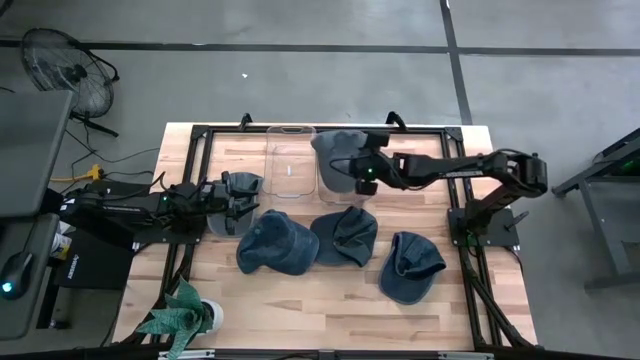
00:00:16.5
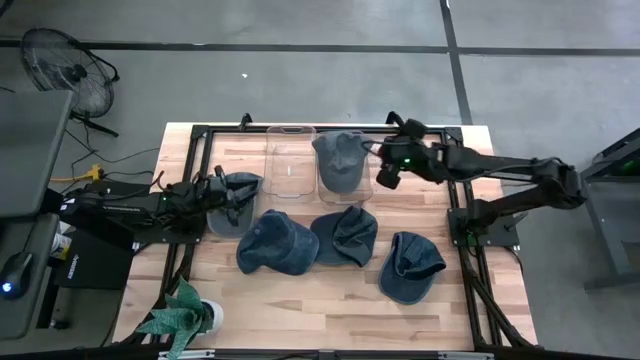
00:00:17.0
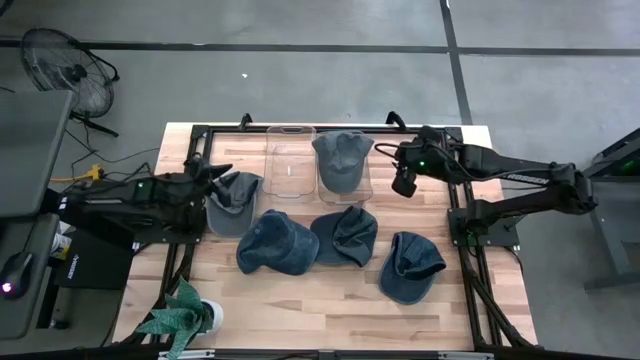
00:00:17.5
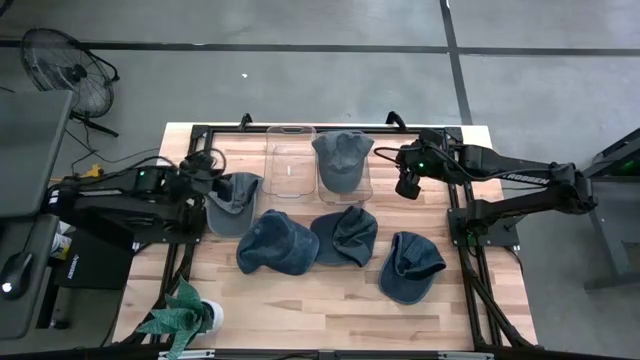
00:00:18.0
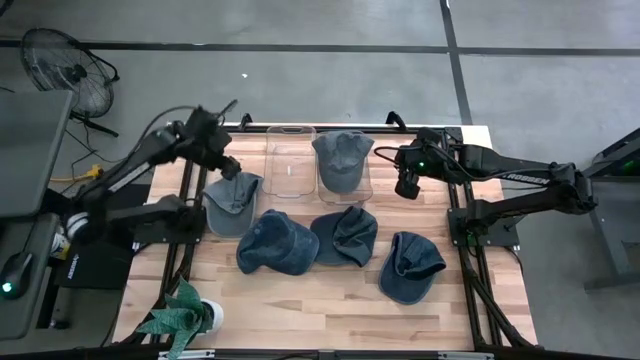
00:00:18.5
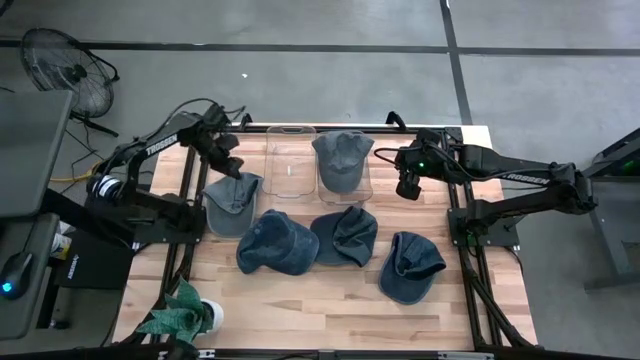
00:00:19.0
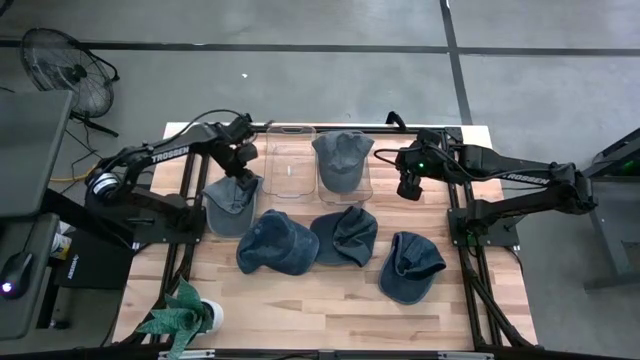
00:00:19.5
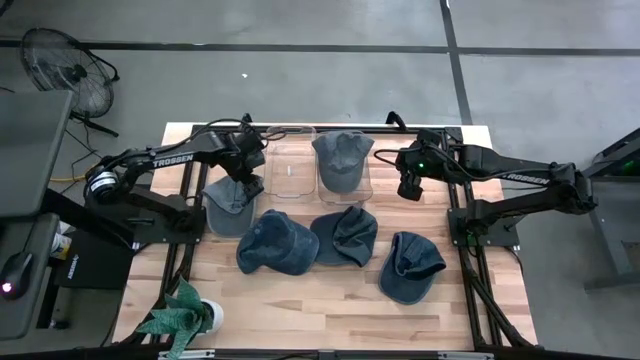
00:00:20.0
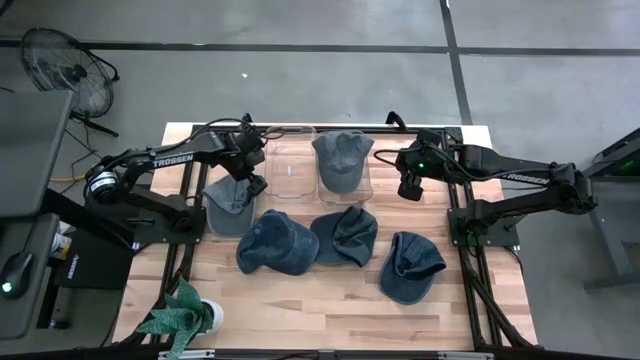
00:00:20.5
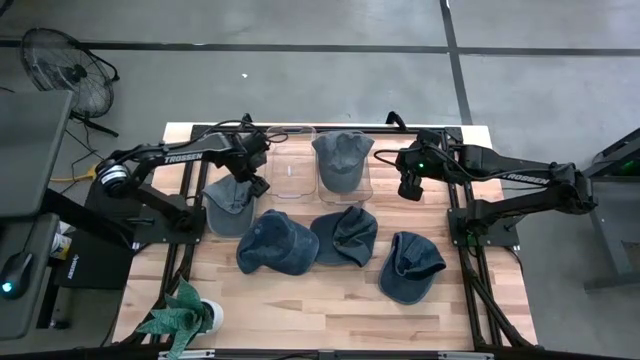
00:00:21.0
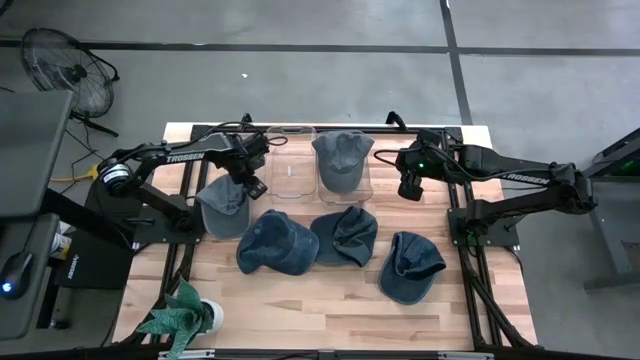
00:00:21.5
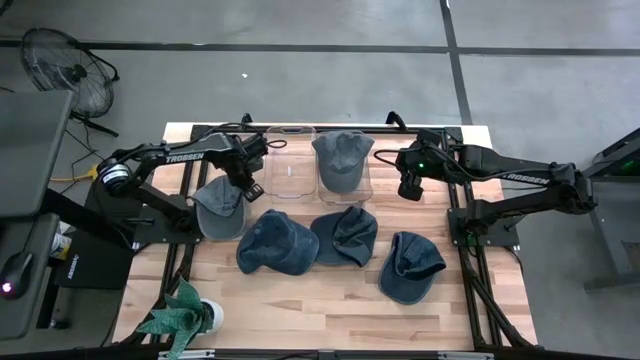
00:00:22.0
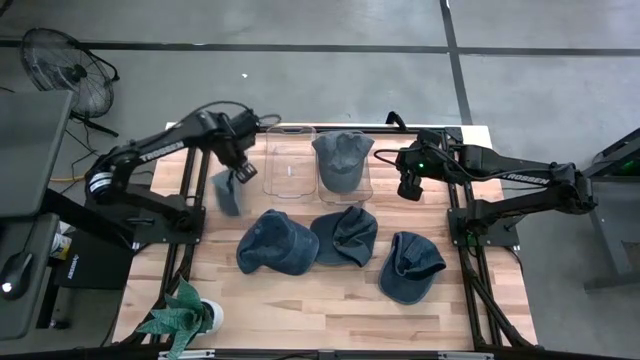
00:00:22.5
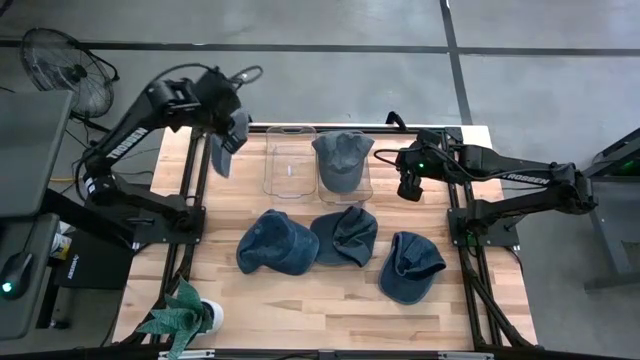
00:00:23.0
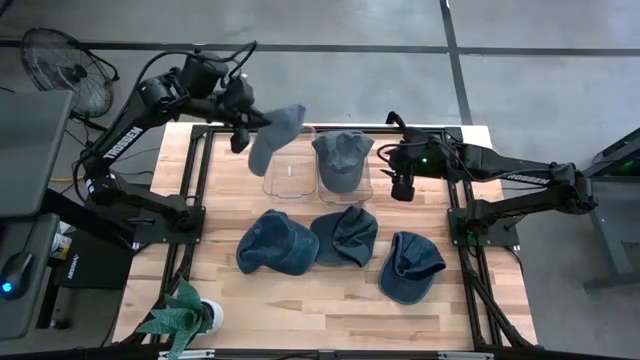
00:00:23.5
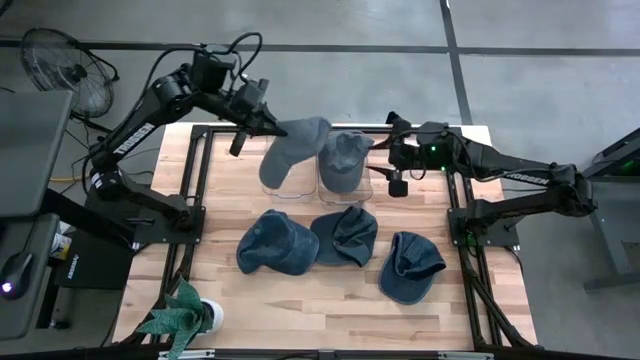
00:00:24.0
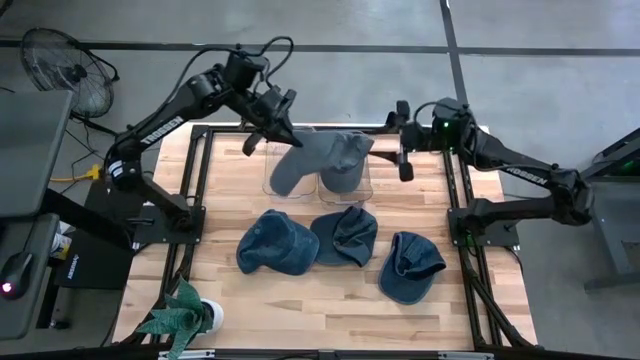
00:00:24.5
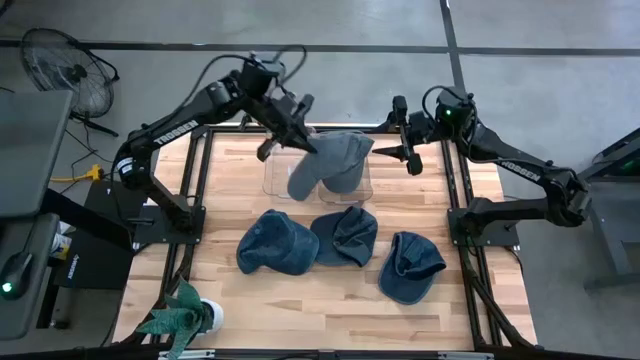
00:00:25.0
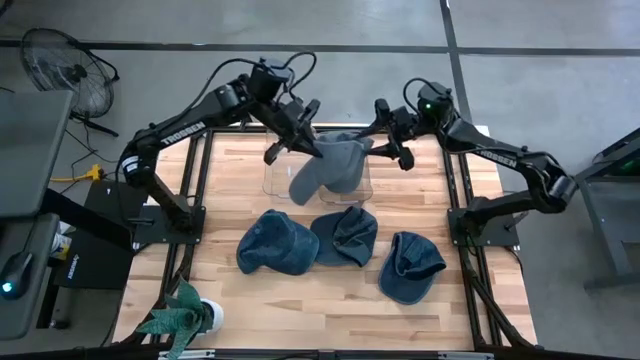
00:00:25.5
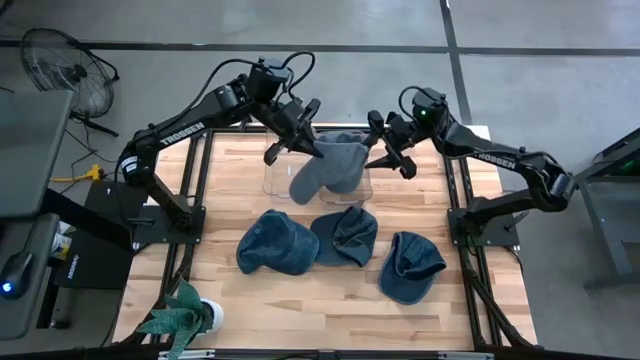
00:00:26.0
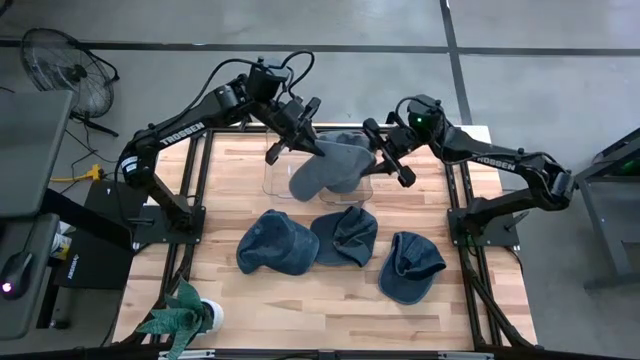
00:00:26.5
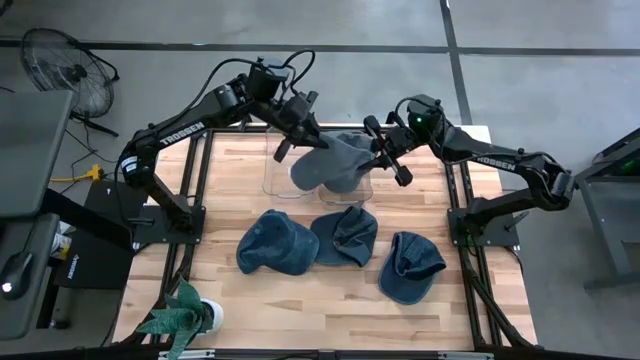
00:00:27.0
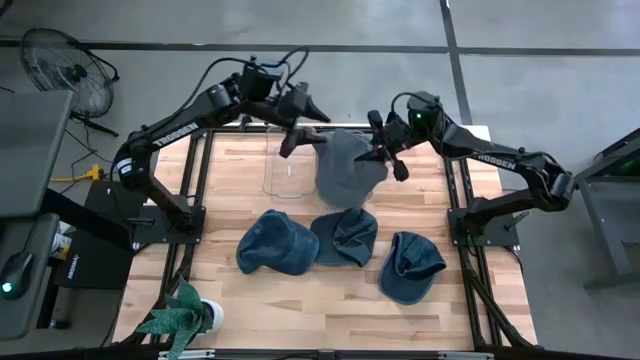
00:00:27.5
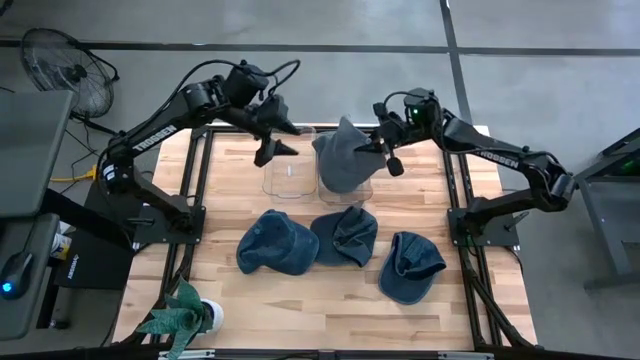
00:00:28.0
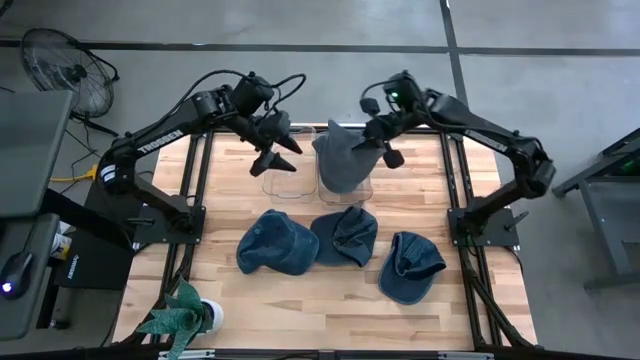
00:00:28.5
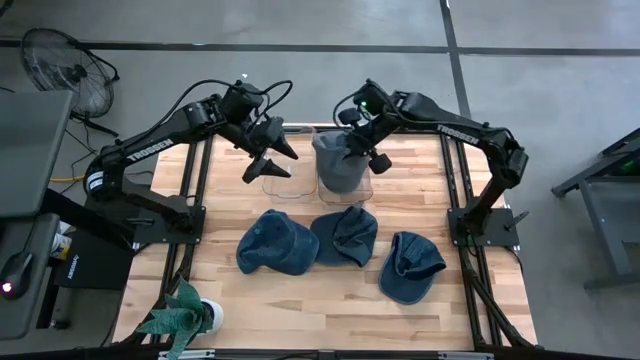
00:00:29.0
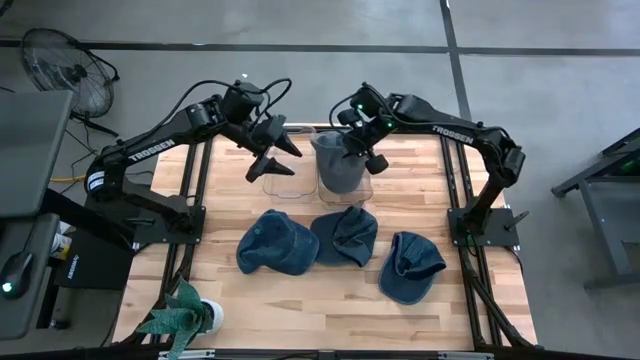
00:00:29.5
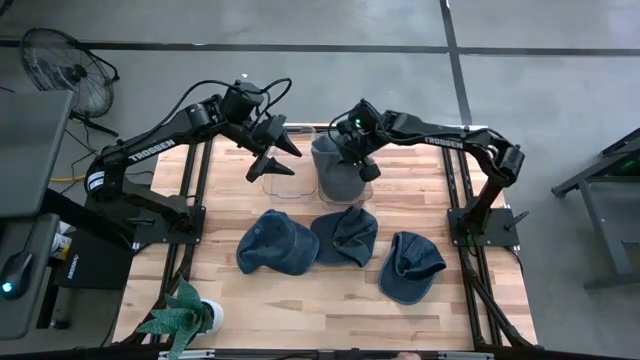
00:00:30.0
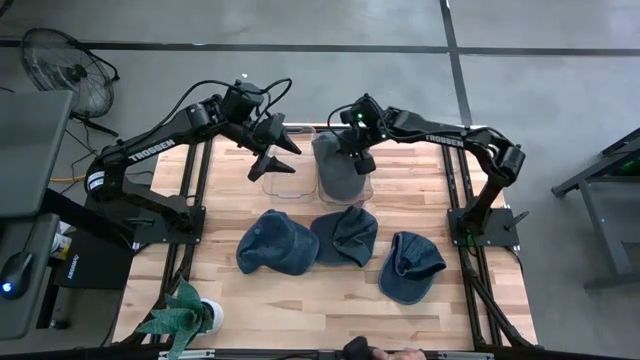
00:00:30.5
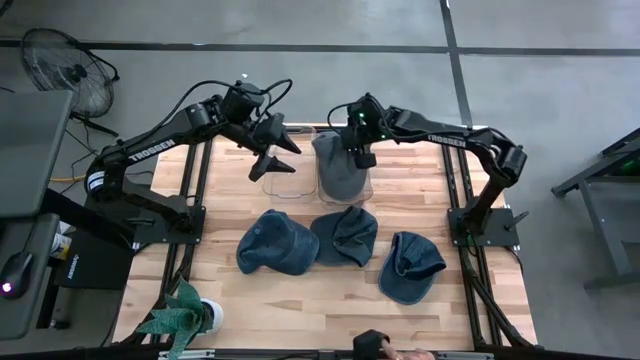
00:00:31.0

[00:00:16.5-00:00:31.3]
Task: Pick & Place hat
Put the gray cap into the right transparent bin

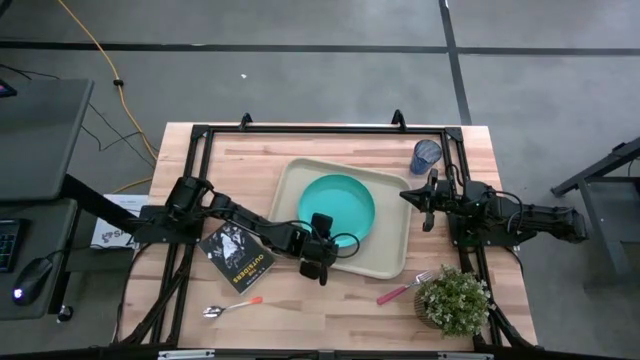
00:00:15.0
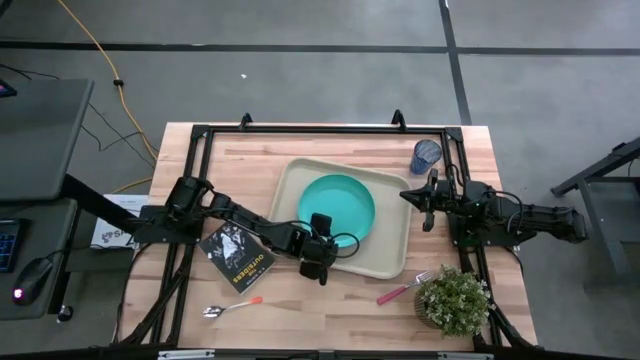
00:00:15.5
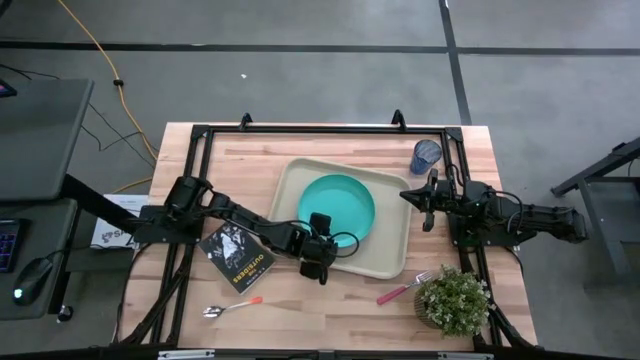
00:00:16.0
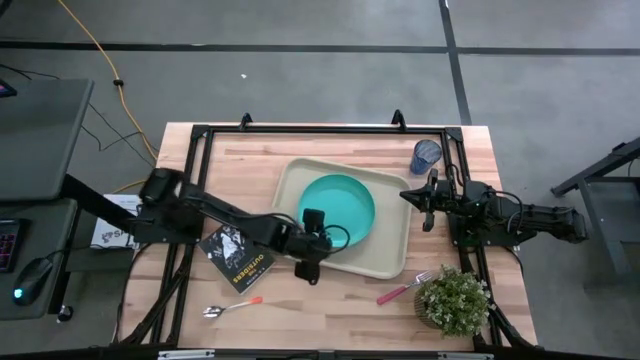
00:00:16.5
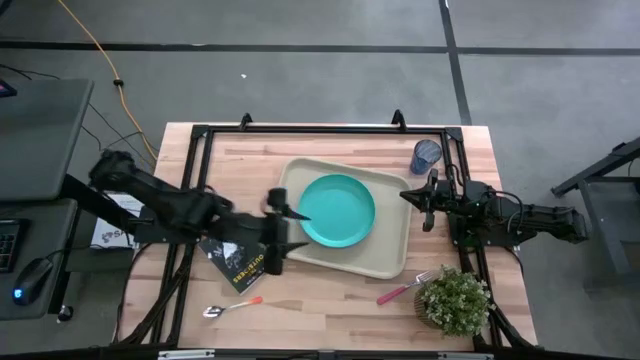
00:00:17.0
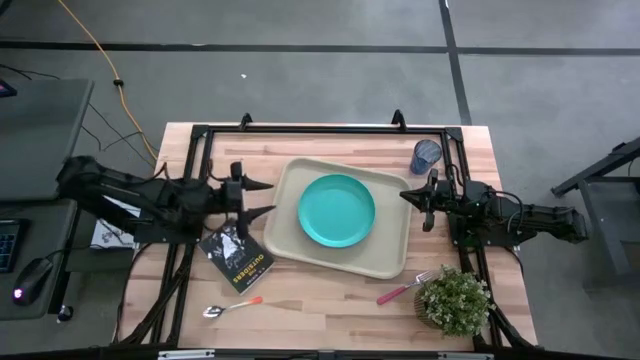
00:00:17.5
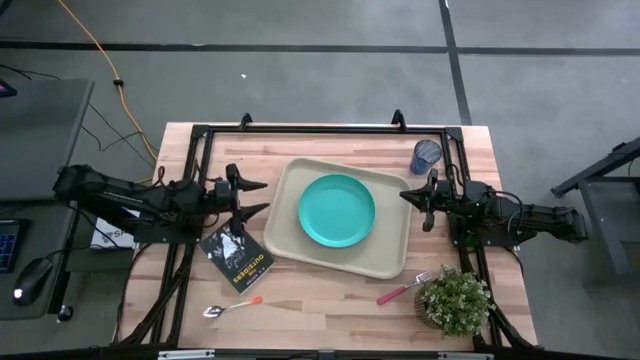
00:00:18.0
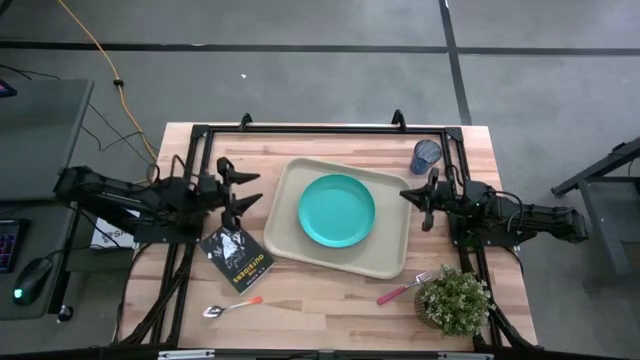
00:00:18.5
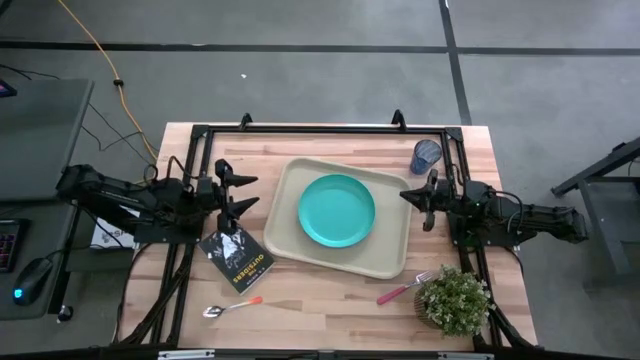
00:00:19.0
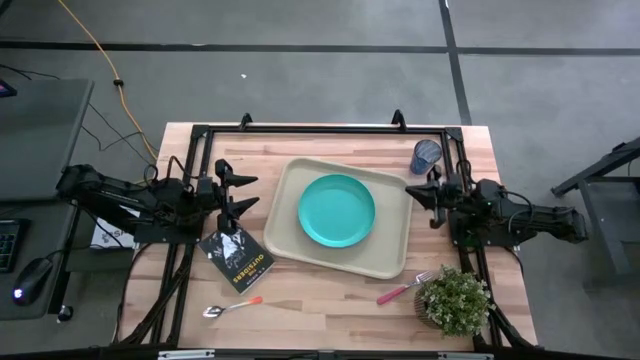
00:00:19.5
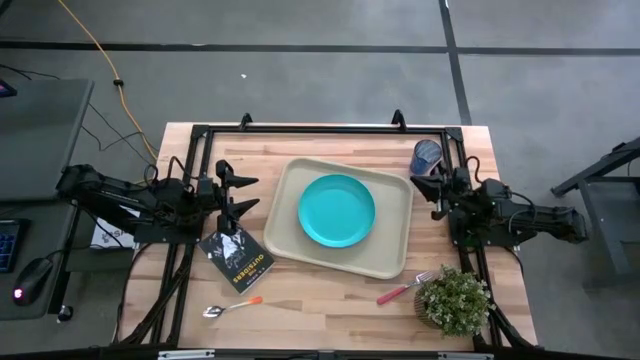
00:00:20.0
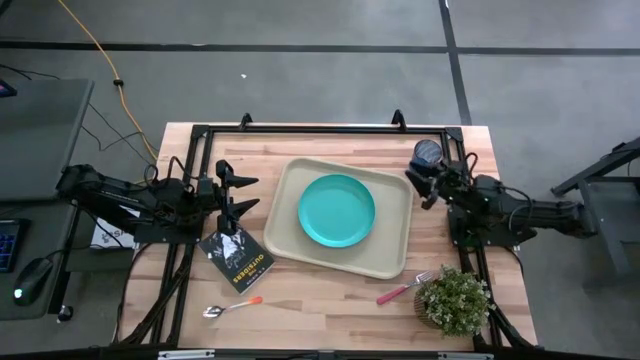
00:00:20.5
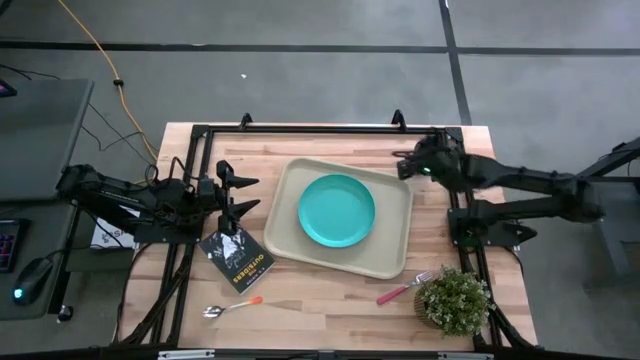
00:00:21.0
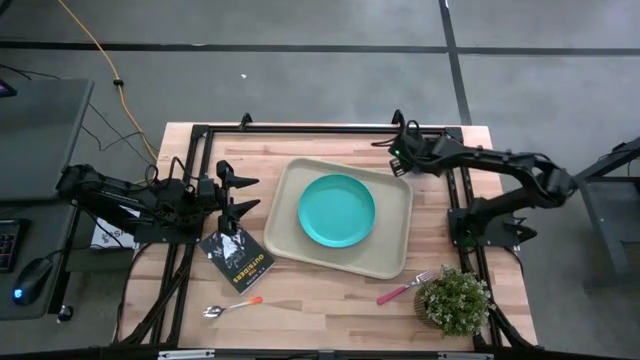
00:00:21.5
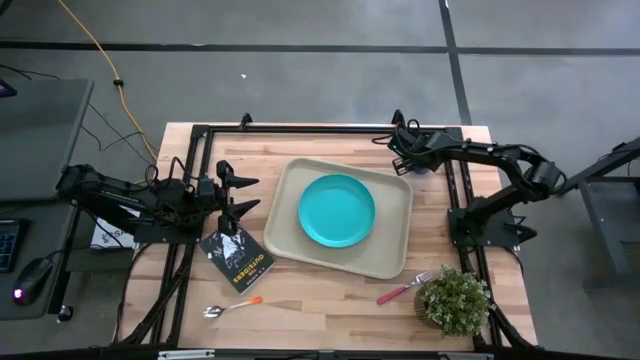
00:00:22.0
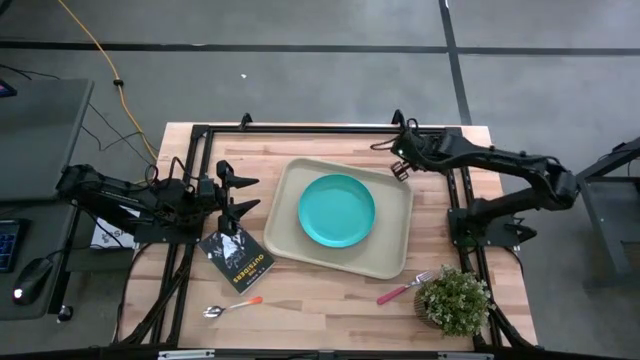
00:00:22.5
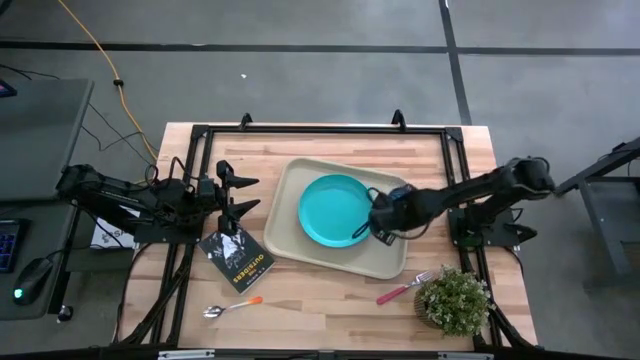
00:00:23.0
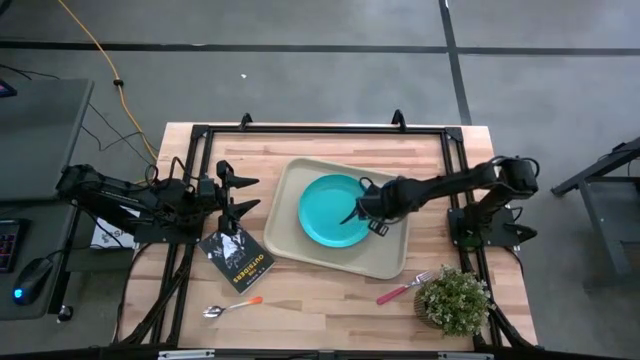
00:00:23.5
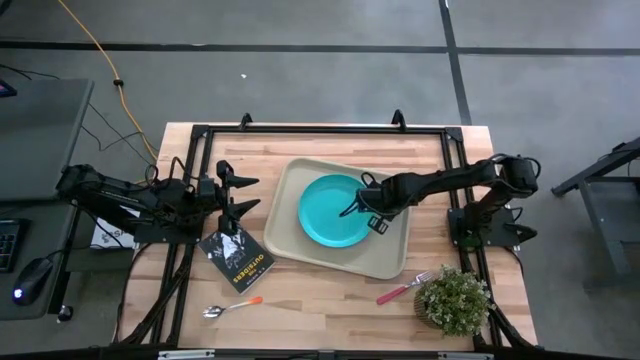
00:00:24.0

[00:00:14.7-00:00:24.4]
Task: Pick and place plate/cup/fork/spoon on tray
Put the blue glass on the gray serving tray to the top right of the blue plate
